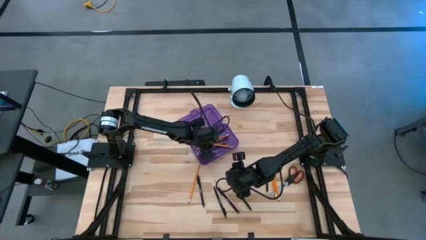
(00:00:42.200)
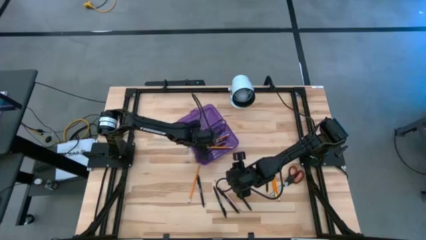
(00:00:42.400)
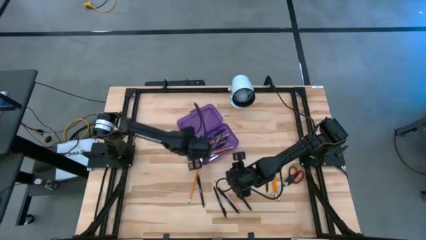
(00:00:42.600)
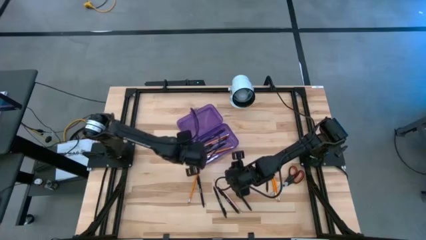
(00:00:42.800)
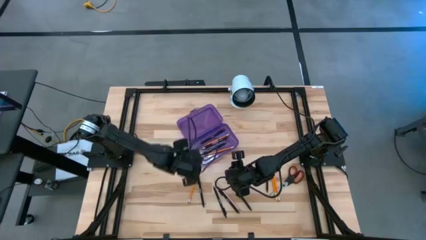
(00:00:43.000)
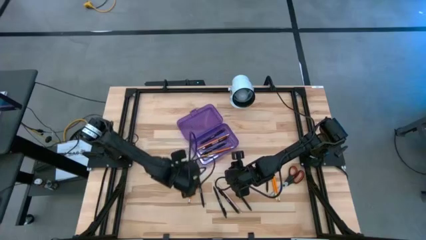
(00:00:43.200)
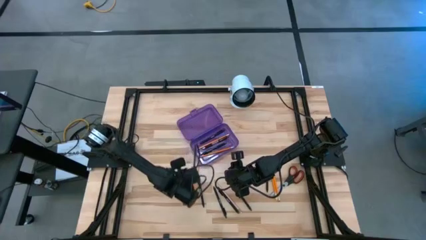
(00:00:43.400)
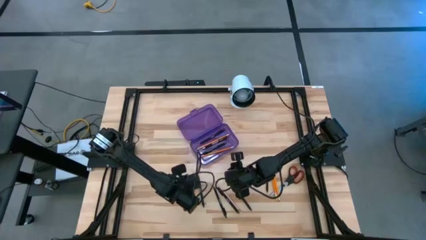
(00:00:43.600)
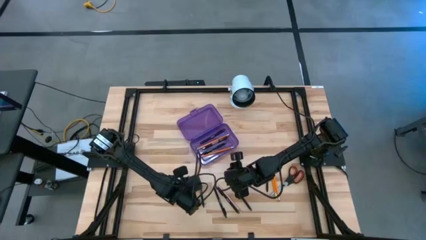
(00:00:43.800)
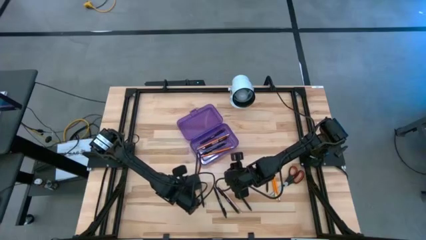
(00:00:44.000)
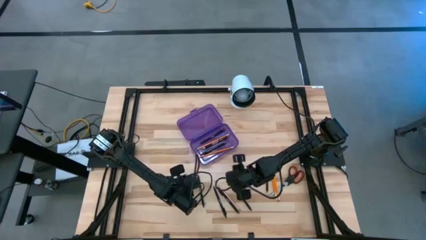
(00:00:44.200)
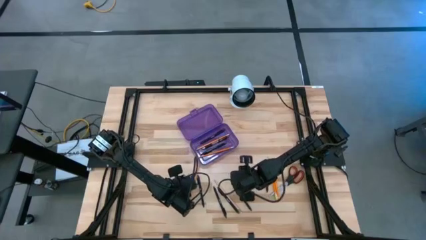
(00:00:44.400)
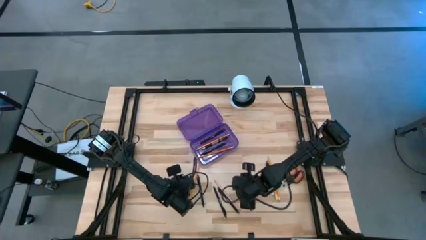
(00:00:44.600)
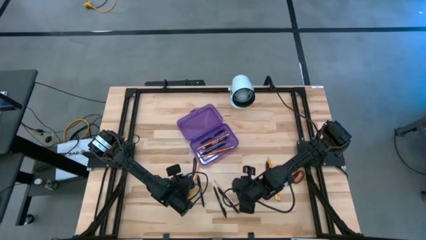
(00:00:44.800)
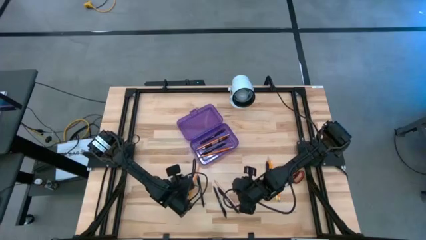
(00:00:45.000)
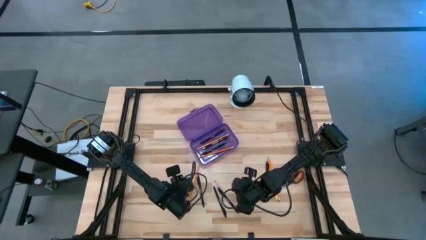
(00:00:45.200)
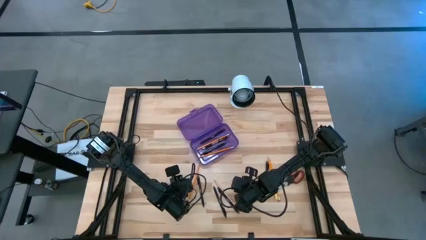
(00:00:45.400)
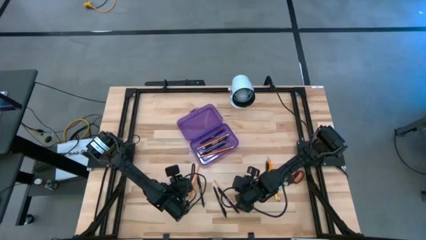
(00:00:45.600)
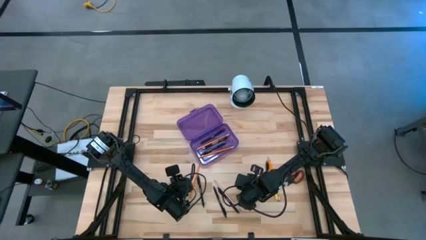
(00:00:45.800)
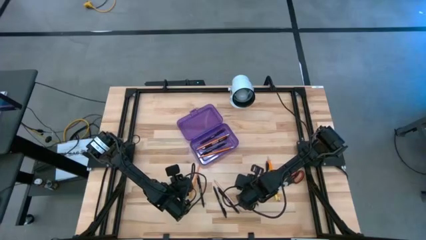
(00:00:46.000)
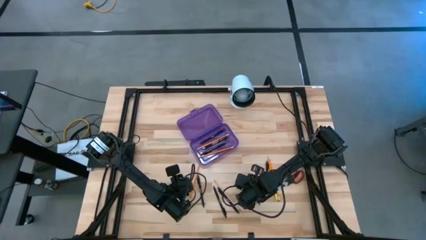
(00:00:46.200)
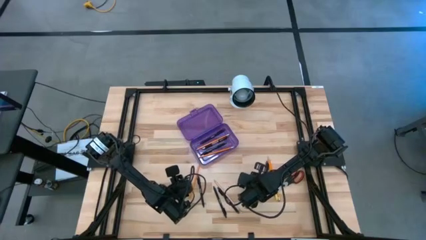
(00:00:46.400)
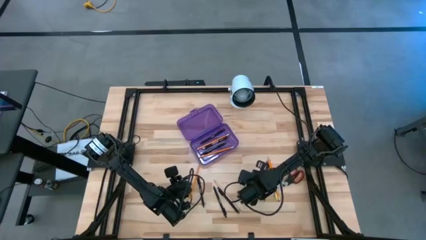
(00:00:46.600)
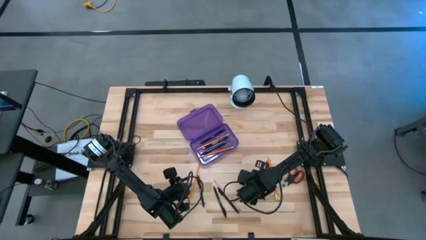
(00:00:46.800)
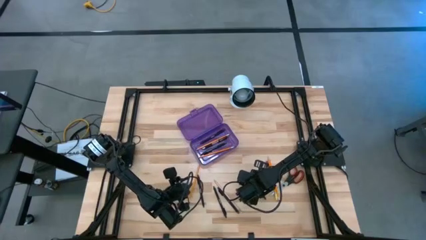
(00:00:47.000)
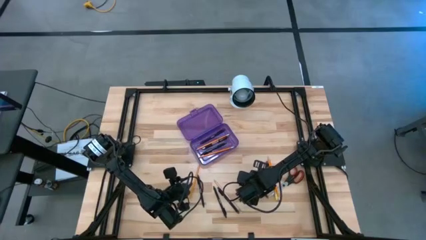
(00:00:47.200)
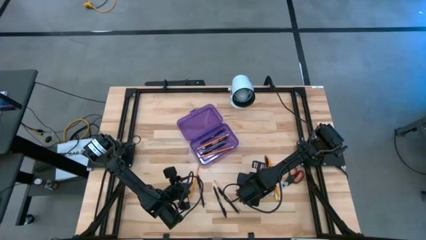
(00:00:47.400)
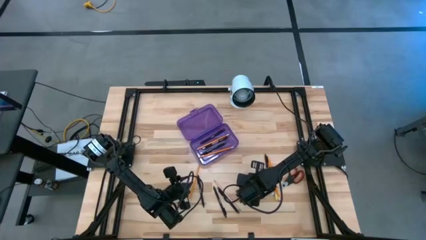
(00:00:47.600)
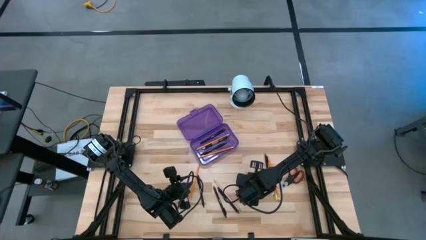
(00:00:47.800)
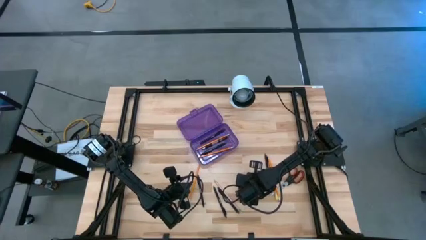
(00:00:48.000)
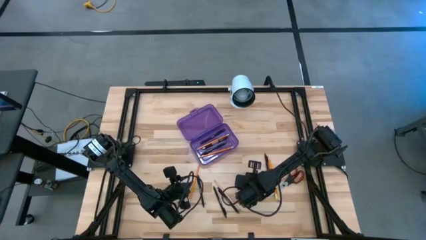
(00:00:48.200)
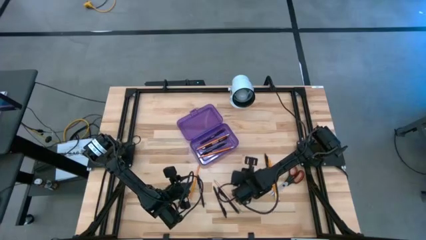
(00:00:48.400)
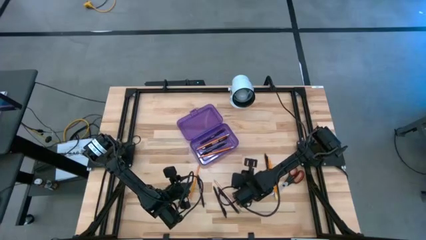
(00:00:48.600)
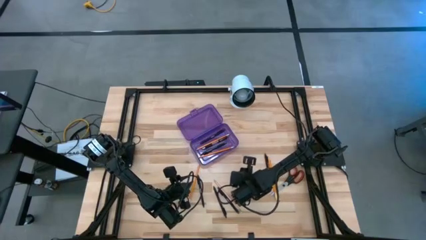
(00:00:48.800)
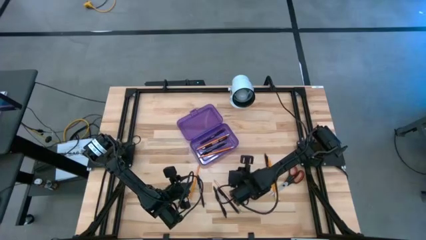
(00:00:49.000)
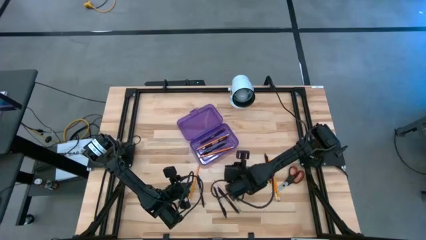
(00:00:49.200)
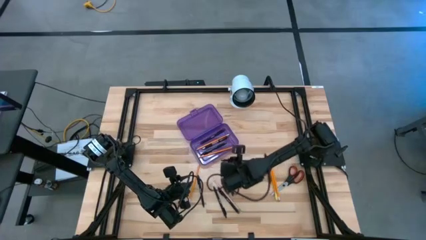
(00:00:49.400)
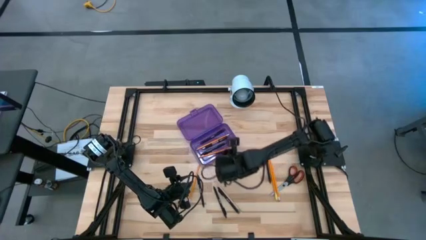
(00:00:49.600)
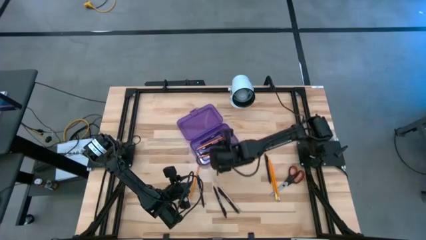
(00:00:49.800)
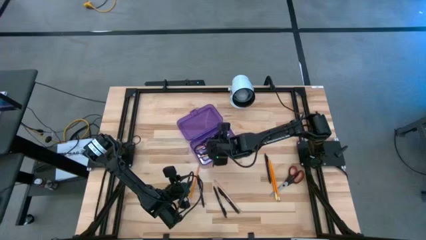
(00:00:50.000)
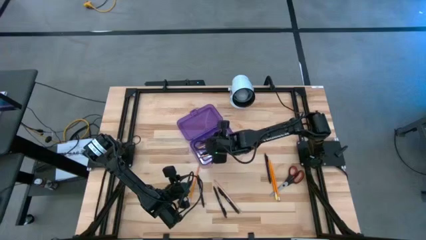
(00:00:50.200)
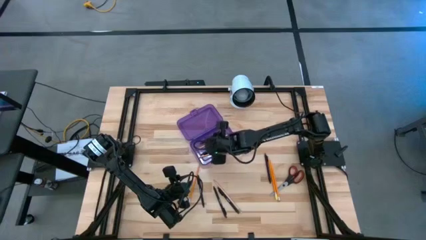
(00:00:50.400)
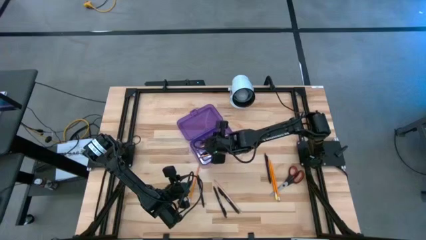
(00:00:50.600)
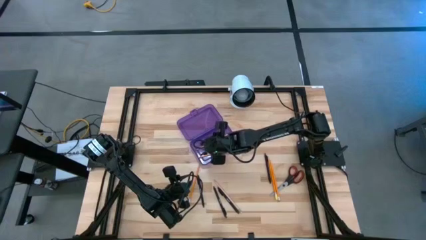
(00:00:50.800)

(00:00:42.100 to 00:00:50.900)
Task: Pick & place school supplies into a supply box
Put the black pen into the purple supply box

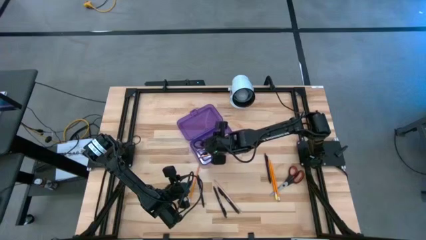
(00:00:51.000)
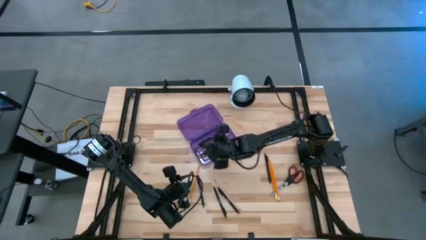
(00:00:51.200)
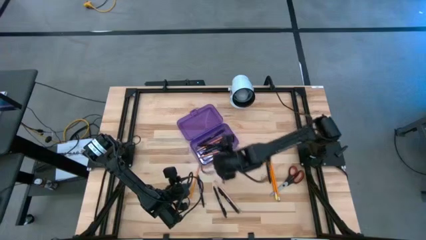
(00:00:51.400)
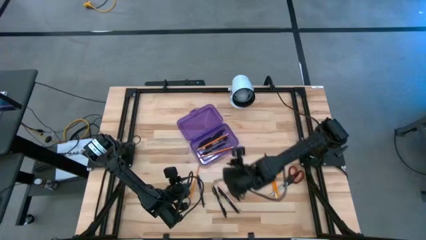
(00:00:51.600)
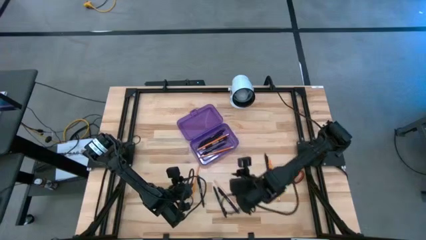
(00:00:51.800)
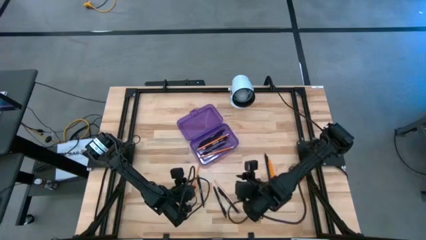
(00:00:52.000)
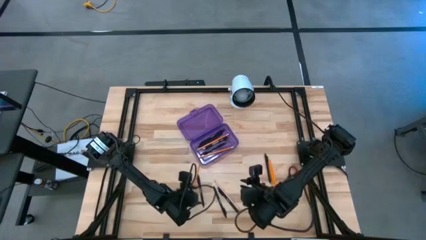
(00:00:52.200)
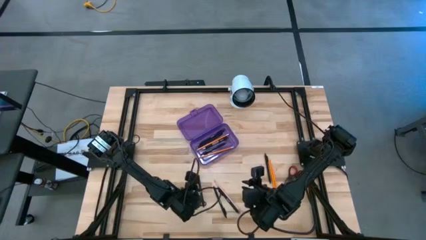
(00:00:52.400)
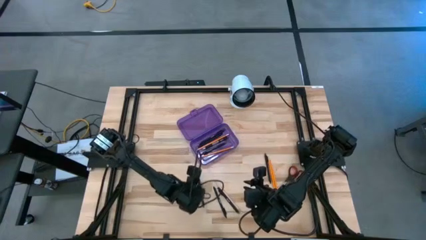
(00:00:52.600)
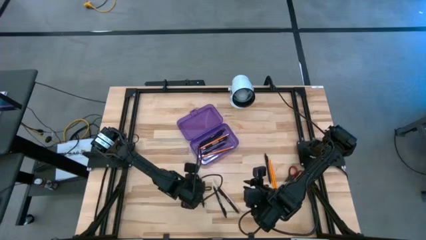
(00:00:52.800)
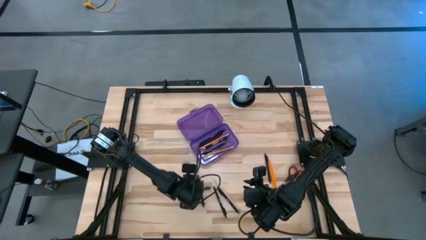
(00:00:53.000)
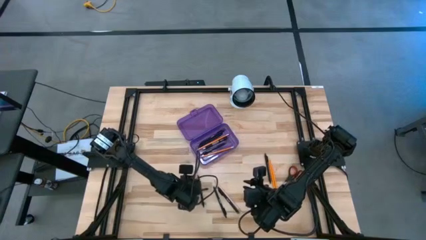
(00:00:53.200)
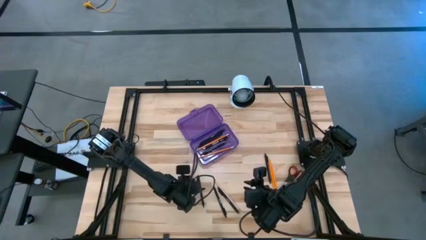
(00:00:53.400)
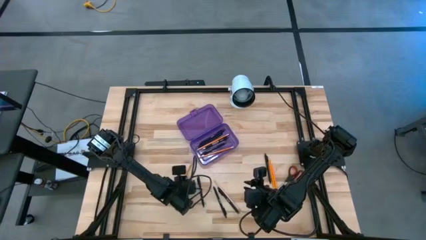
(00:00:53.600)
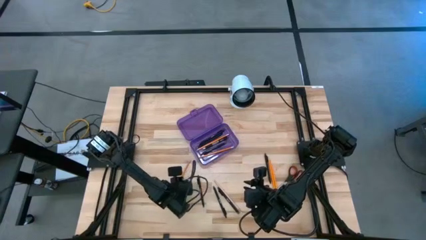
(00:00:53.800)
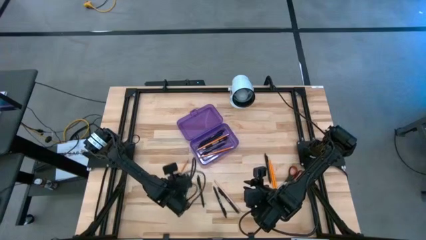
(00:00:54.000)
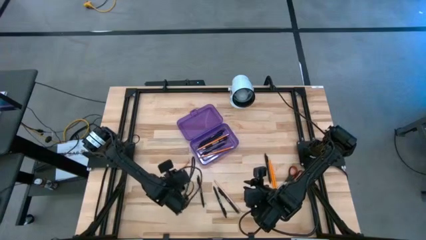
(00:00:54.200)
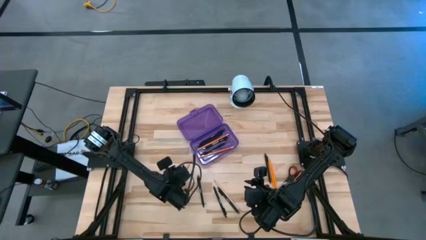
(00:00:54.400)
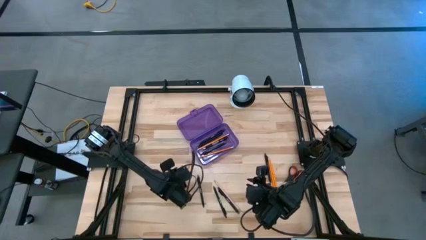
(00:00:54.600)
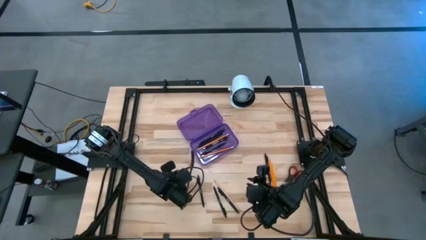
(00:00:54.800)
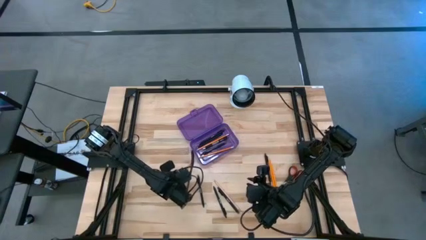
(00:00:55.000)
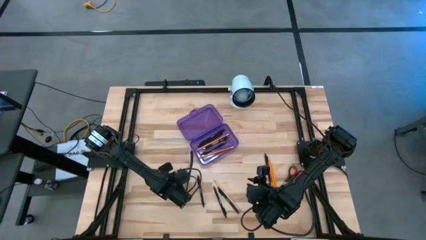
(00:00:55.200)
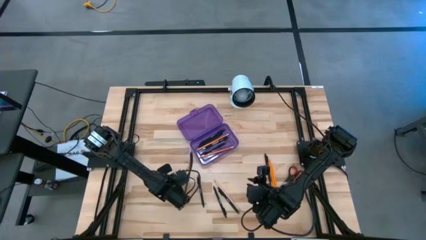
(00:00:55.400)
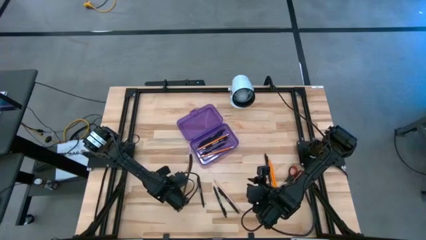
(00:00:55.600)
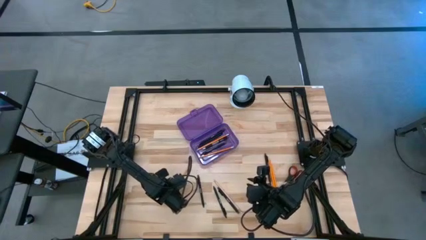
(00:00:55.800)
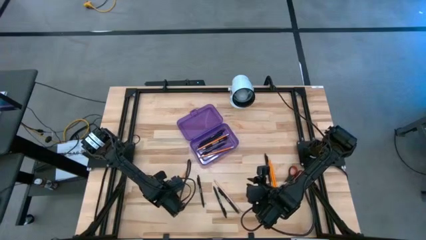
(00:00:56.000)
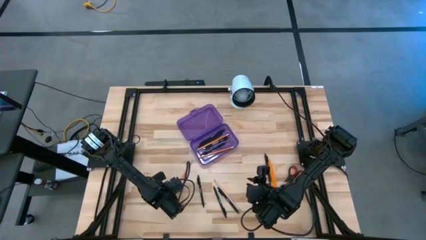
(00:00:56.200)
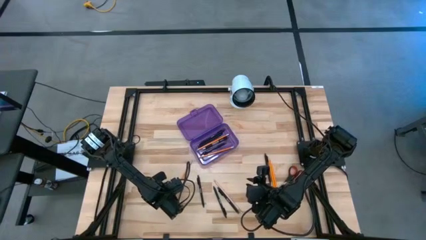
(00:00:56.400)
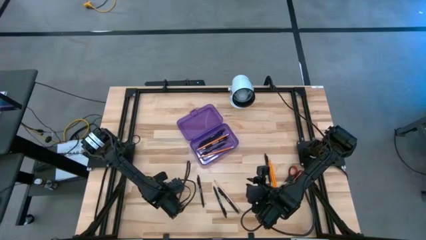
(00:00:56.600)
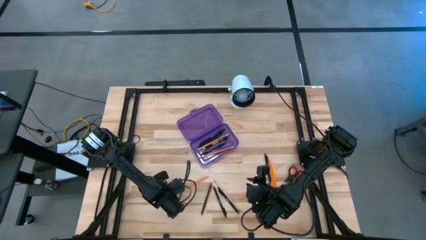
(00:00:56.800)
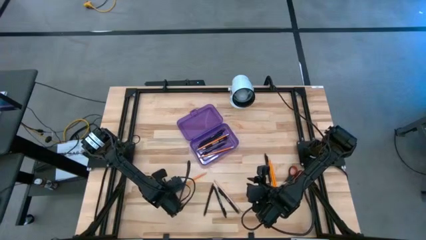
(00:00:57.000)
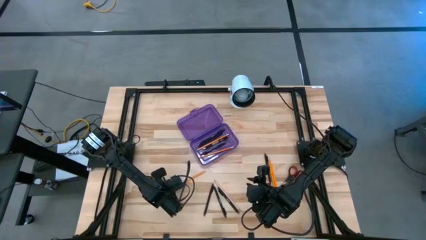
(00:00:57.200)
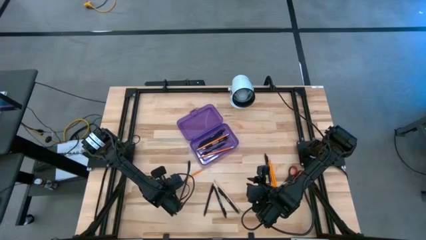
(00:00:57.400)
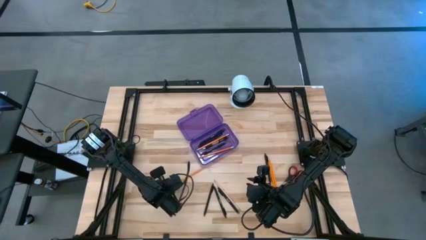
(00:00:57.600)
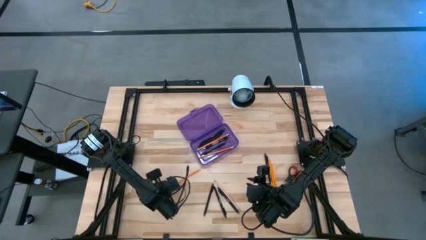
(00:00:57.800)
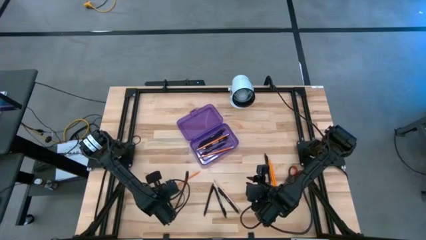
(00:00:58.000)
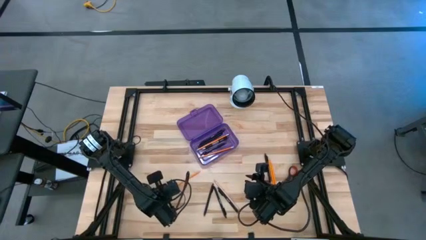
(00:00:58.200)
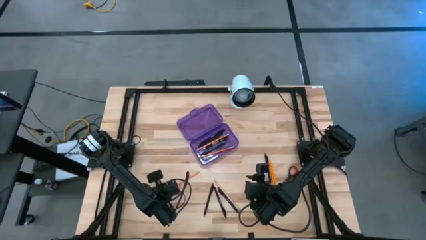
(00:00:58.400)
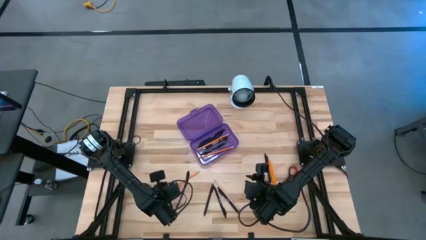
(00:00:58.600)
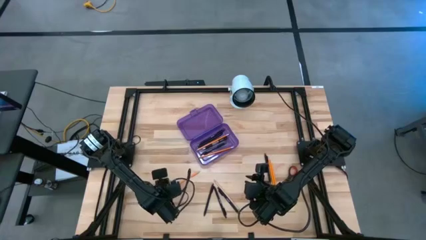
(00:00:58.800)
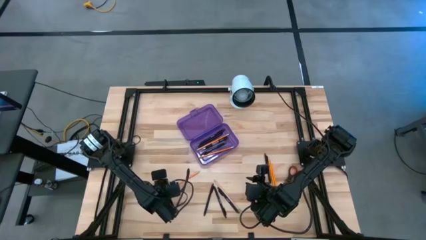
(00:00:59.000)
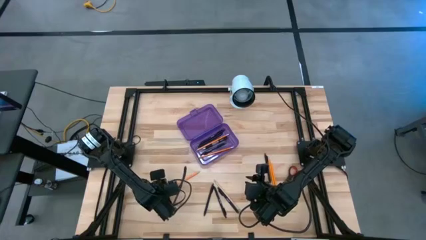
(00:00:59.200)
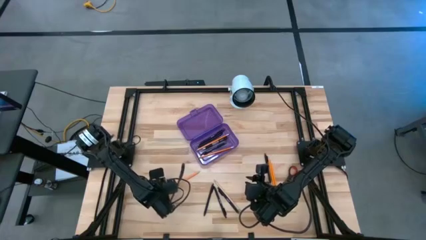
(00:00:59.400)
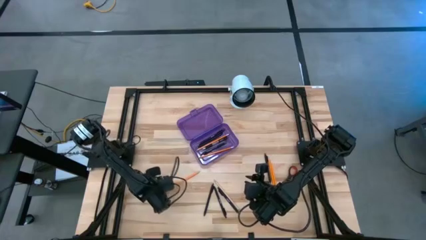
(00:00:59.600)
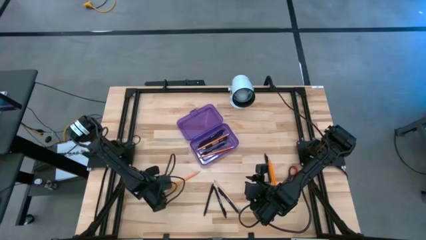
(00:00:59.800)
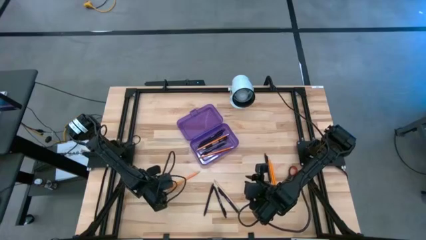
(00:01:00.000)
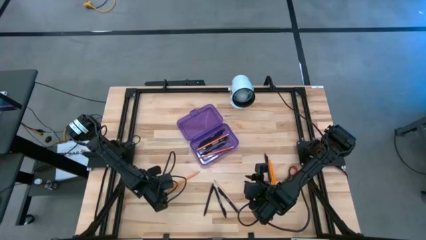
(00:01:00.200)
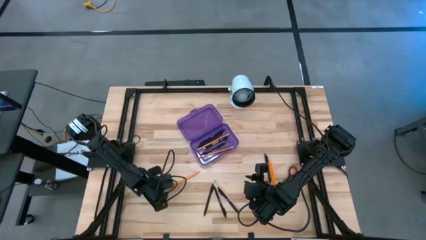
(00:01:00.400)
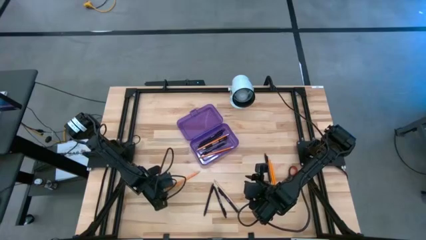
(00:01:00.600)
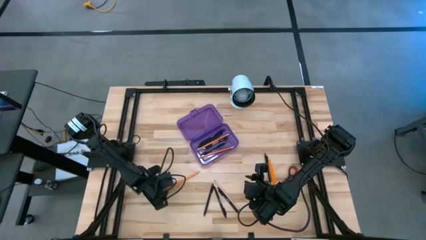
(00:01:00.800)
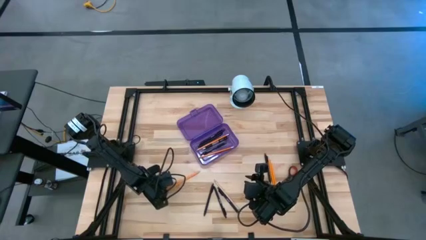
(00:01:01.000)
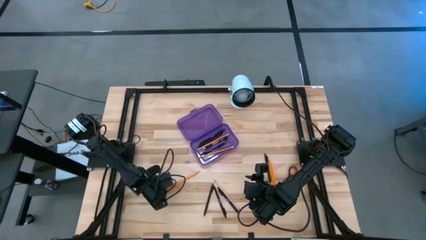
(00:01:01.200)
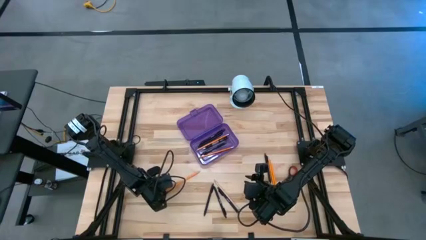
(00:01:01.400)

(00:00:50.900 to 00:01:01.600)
Put the orange pencil into the purple supply box
